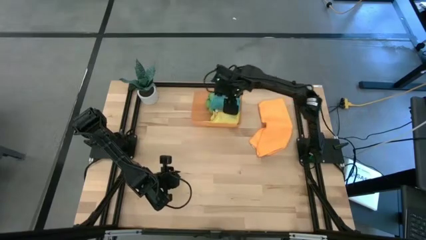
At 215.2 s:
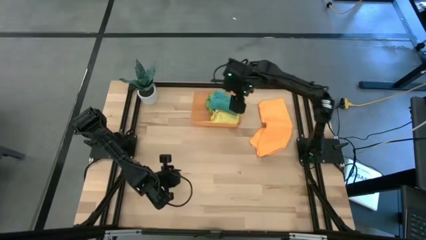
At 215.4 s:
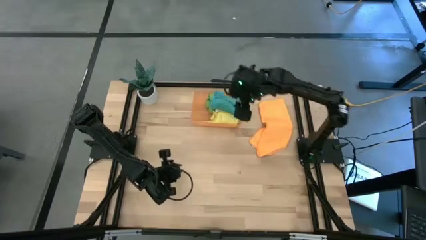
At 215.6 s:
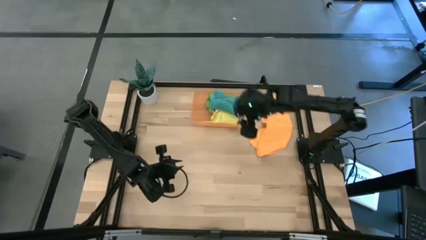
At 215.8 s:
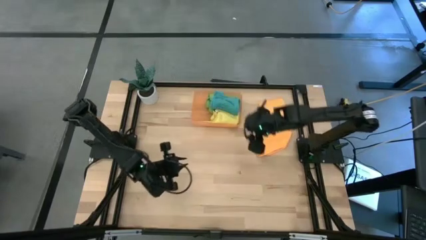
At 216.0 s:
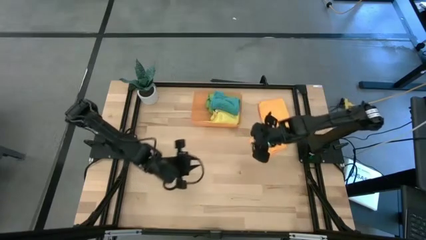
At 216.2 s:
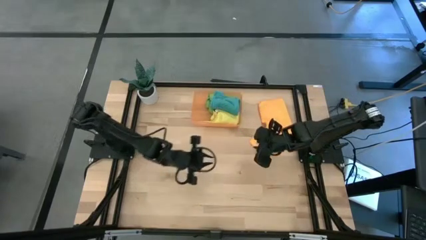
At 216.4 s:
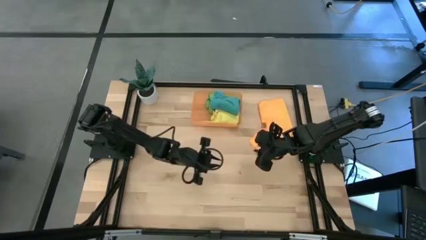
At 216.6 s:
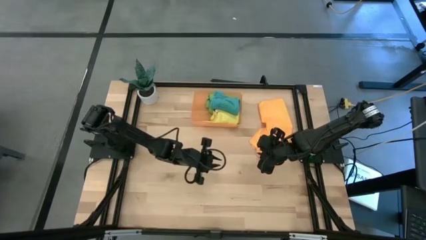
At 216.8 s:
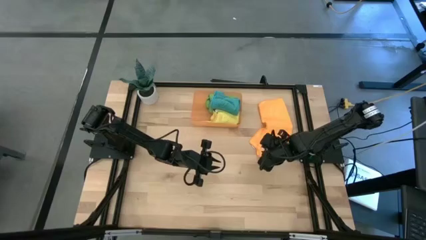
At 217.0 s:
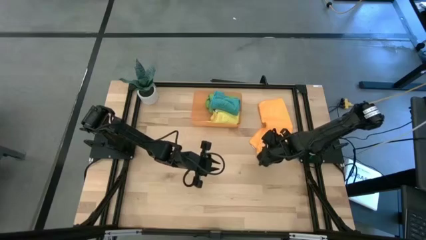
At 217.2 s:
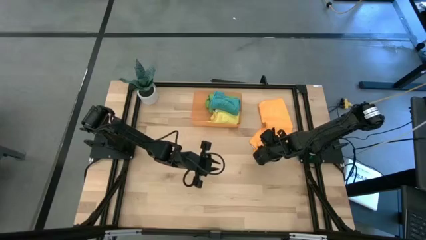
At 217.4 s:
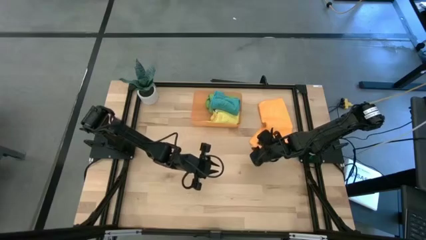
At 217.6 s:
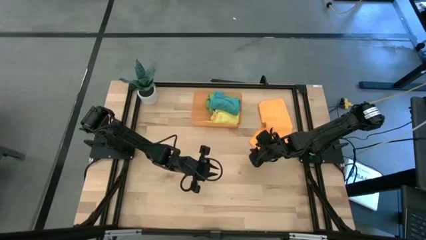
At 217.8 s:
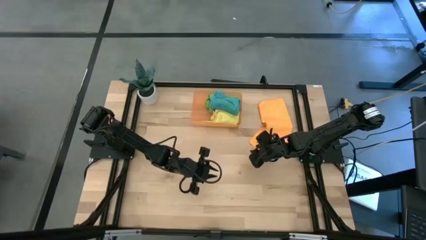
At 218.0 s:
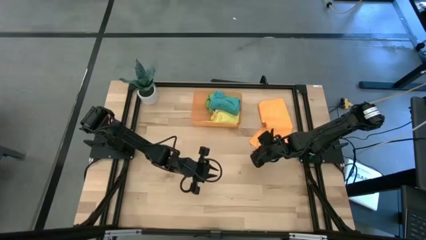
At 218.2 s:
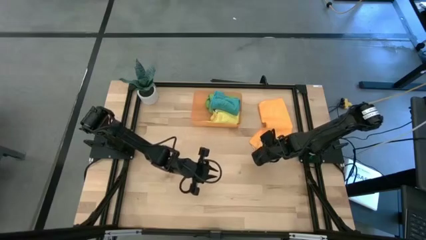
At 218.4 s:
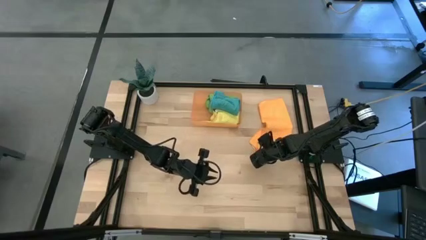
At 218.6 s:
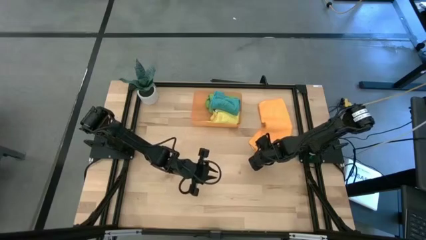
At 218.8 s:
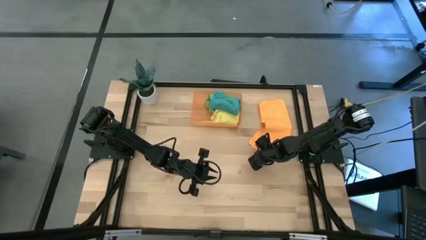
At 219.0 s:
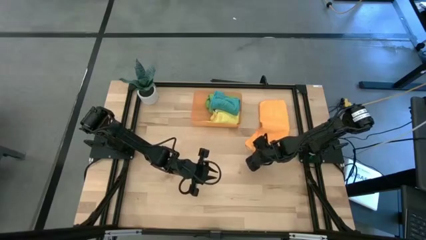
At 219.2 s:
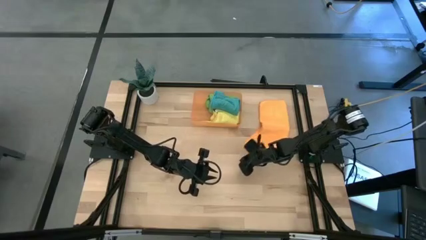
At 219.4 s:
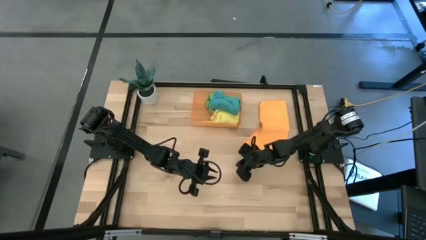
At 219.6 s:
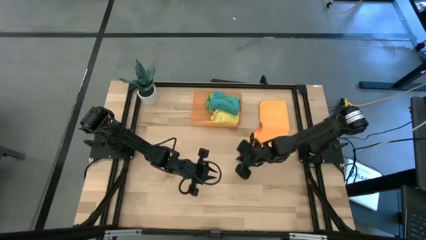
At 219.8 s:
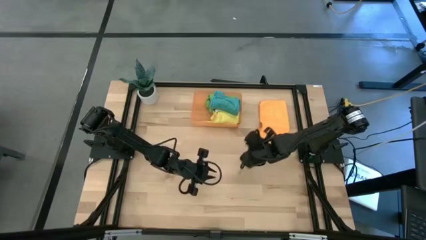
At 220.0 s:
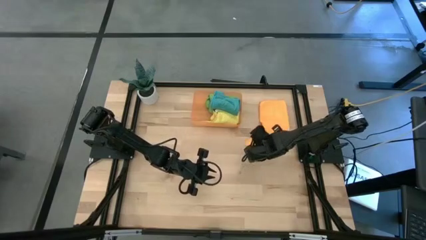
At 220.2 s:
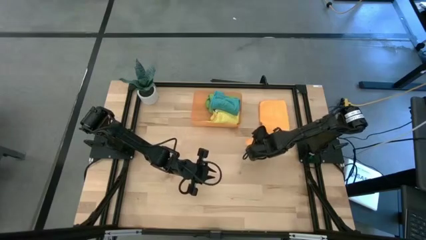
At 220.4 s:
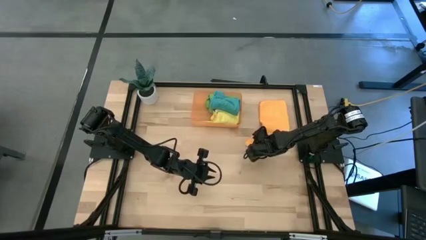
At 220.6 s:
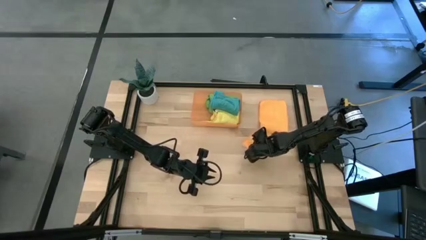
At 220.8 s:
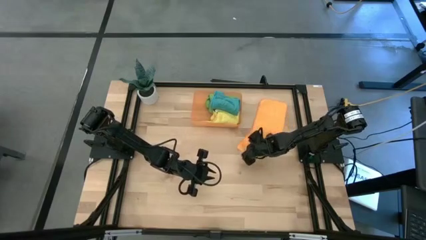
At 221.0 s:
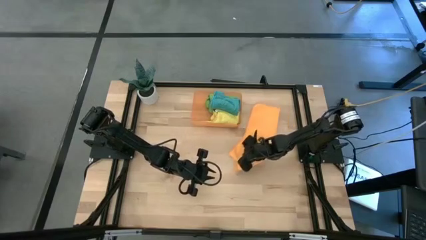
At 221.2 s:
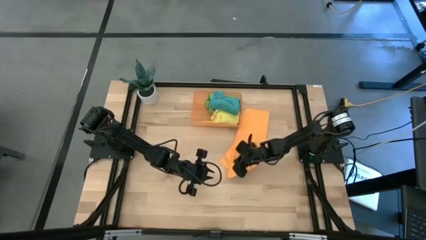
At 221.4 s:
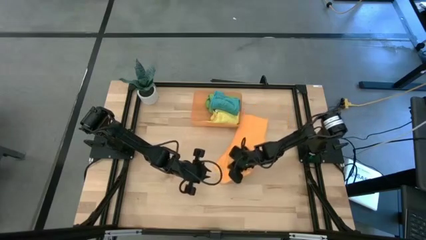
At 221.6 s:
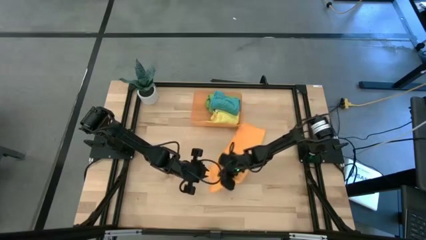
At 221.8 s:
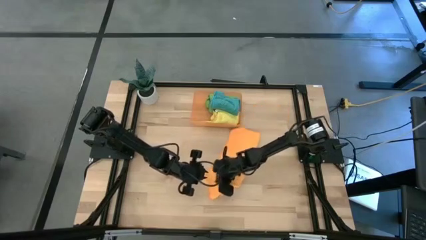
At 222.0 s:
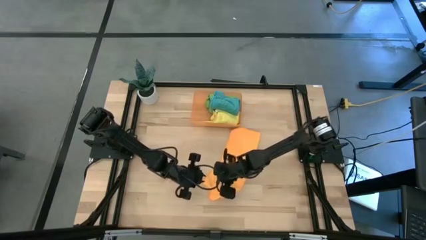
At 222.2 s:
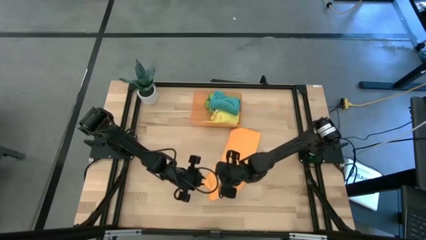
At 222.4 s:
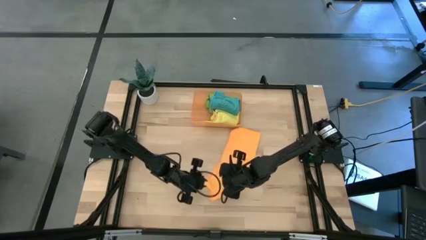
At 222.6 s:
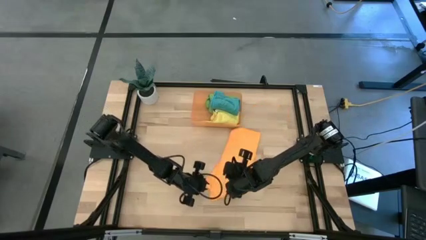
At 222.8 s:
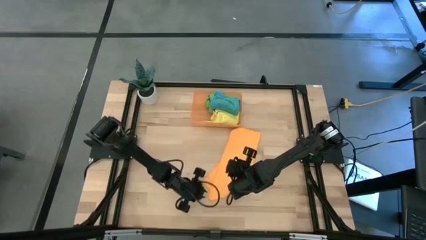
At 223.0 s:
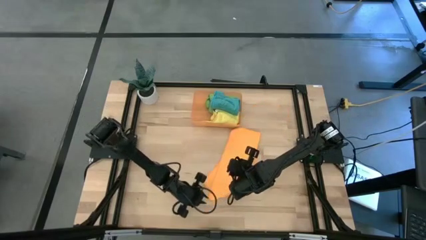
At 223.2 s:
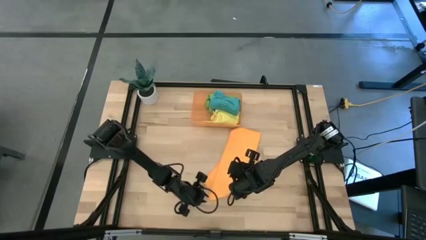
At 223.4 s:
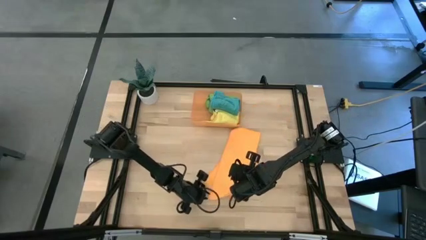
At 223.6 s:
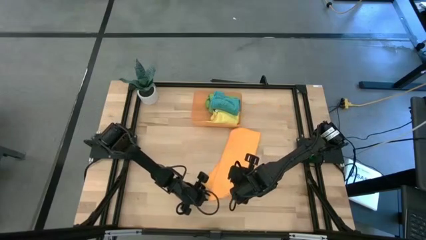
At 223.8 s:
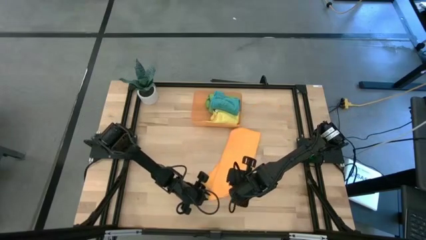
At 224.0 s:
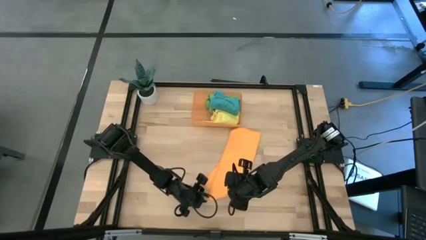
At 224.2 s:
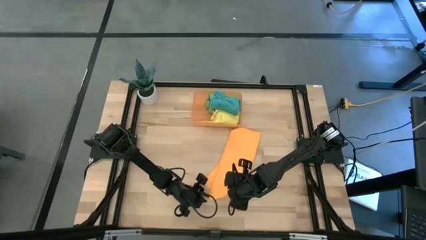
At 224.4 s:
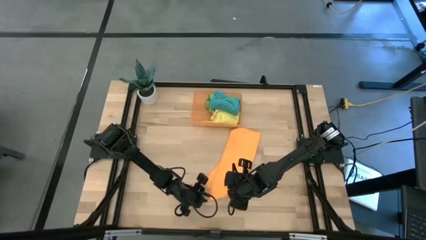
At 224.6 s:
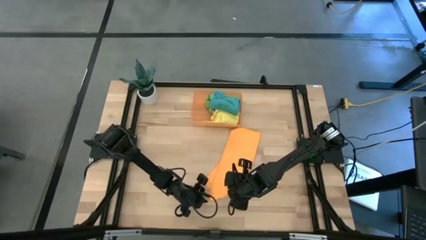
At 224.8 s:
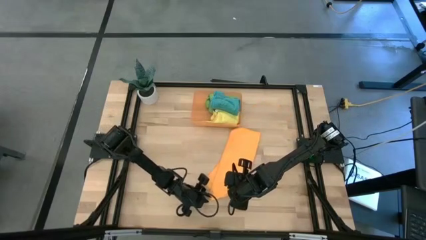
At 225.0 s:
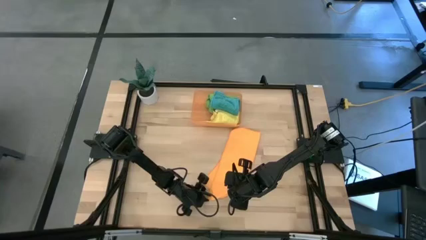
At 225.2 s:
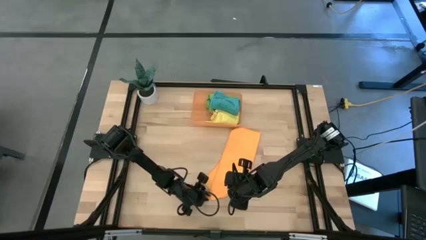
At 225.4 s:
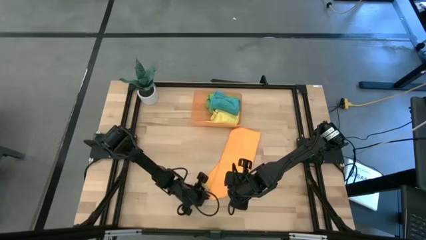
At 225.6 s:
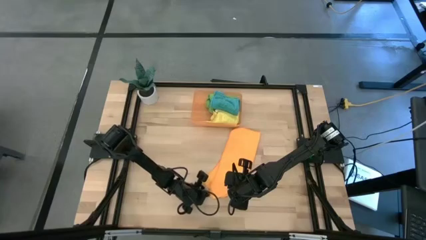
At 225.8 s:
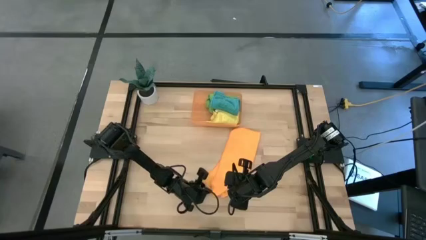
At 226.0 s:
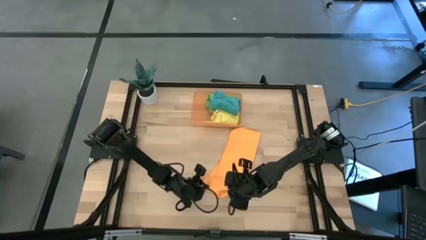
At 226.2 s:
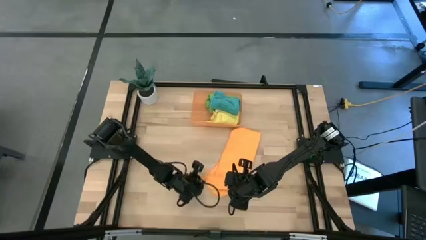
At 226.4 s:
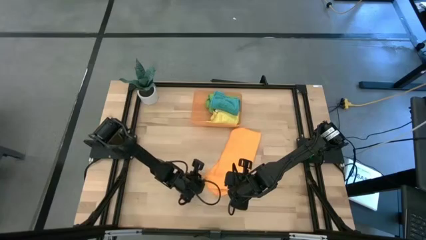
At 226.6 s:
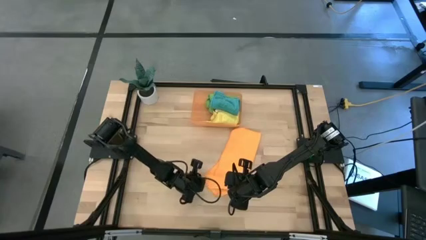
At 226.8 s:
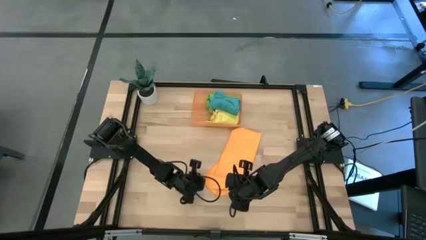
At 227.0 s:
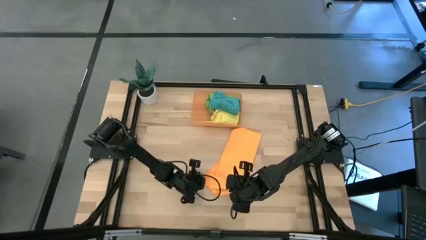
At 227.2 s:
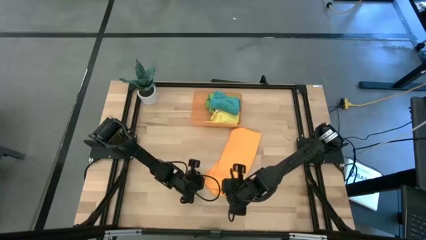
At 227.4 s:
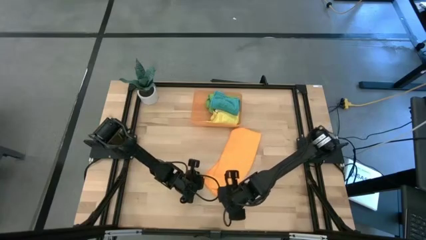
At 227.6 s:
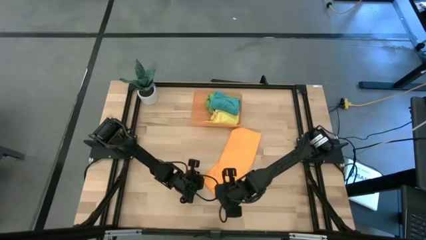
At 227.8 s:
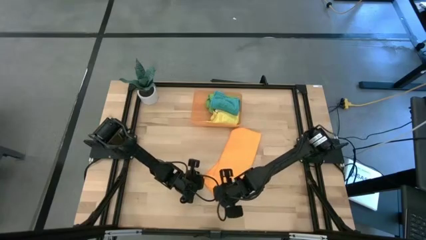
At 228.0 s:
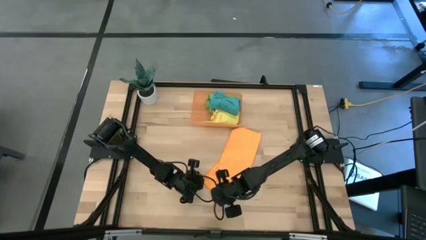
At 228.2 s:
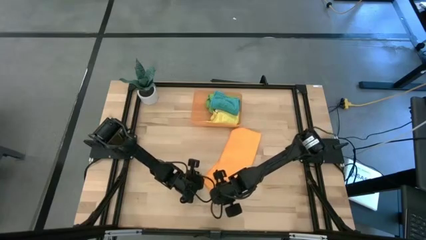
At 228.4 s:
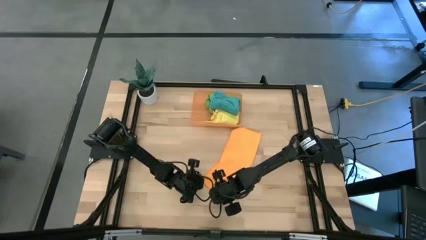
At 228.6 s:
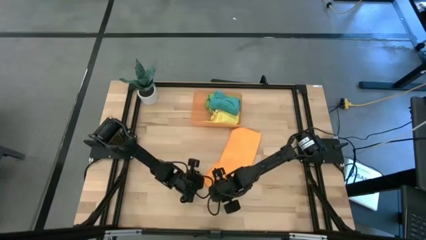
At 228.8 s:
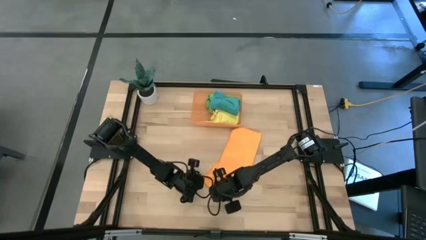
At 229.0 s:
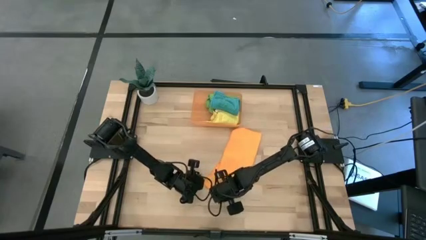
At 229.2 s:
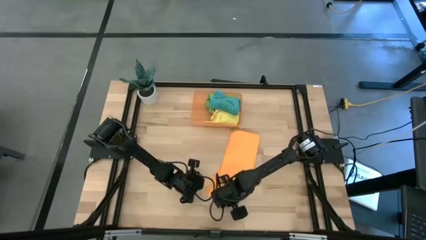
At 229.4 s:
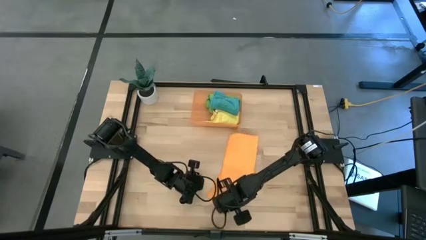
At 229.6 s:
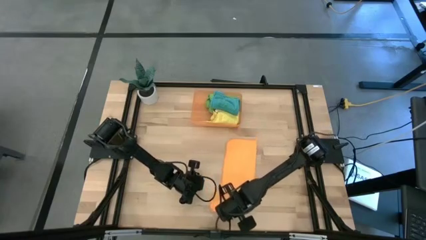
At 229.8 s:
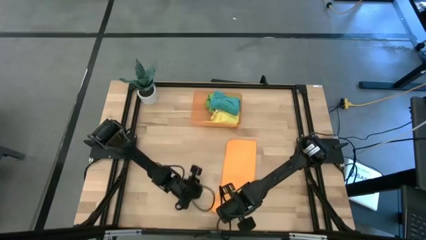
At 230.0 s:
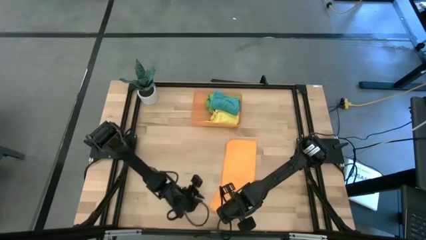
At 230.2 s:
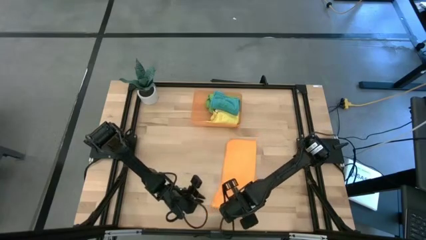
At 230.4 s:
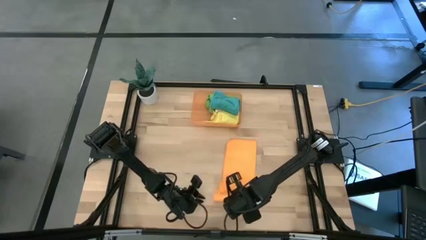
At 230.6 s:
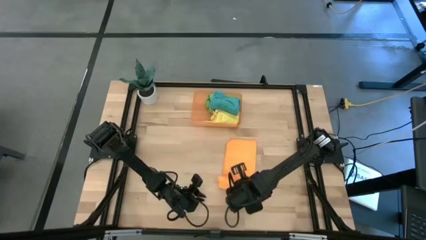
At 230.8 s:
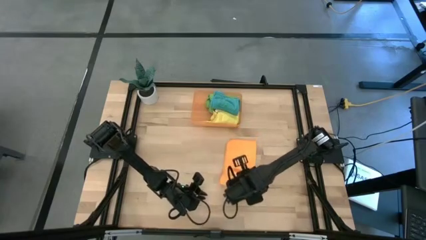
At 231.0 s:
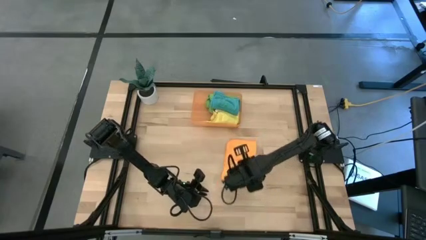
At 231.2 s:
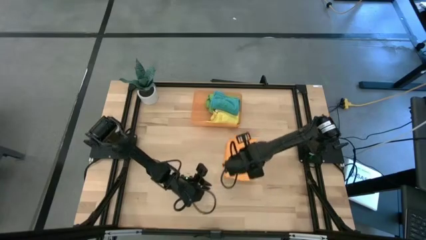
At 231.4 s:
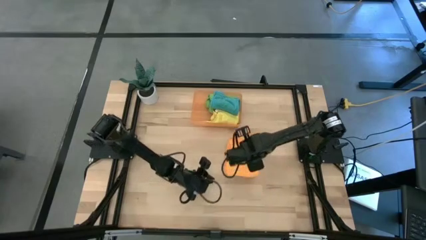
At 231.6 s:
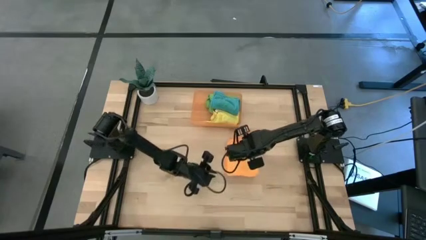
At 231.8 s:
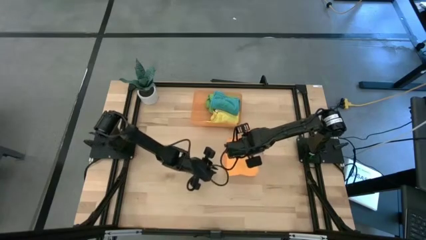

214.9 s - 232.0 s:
Task: Roll microfiber towels into tight, uniform cylinder then place into a basket
Roll the orange microfiber cloth
